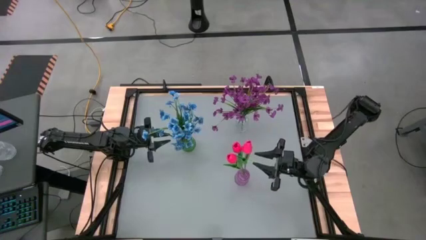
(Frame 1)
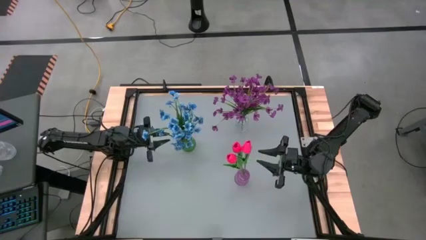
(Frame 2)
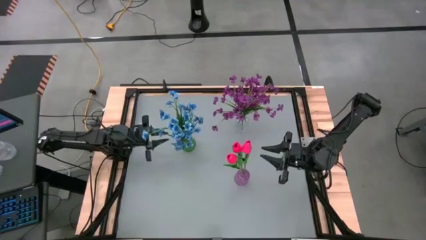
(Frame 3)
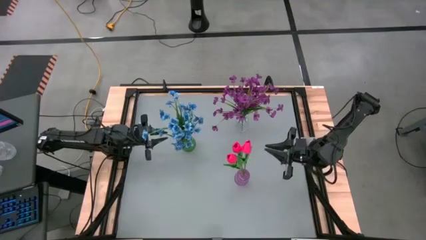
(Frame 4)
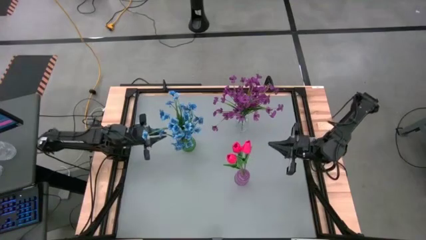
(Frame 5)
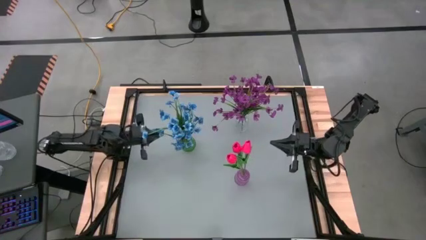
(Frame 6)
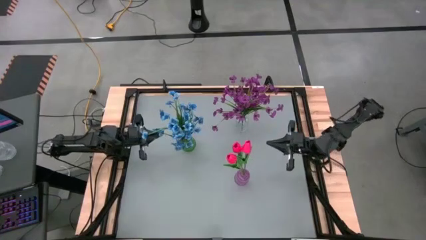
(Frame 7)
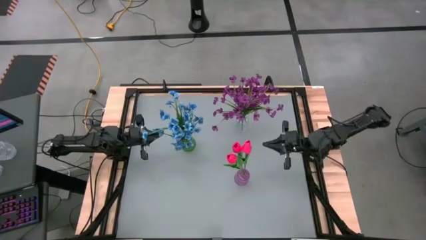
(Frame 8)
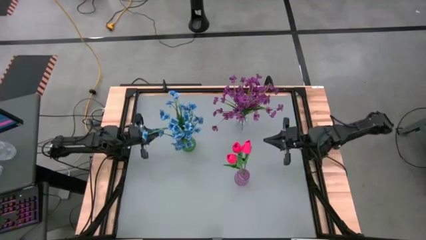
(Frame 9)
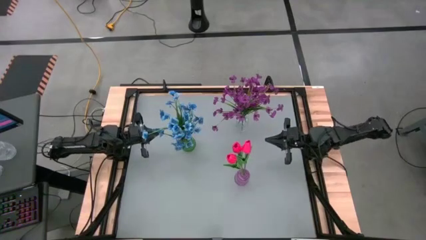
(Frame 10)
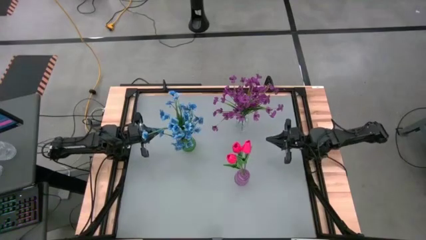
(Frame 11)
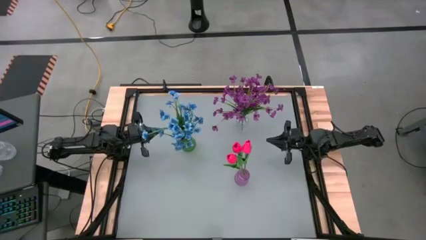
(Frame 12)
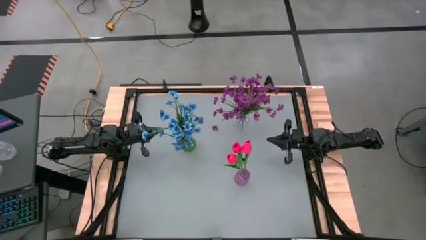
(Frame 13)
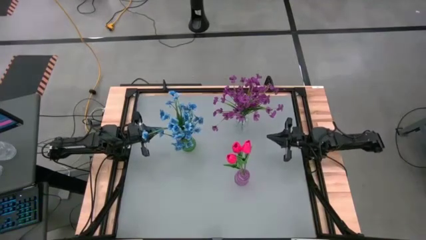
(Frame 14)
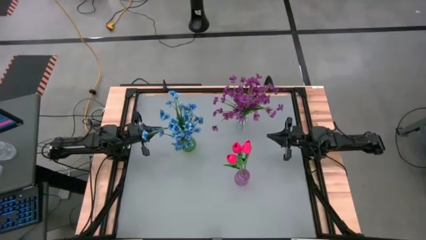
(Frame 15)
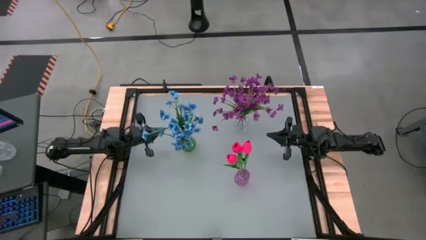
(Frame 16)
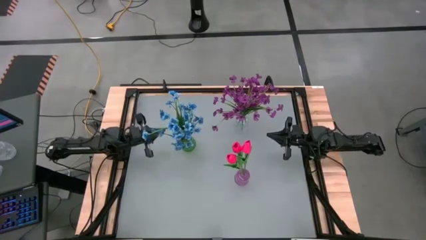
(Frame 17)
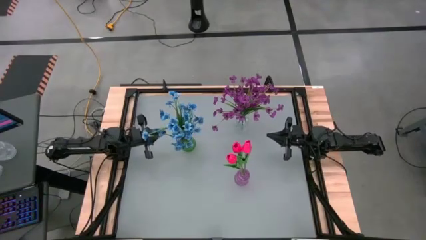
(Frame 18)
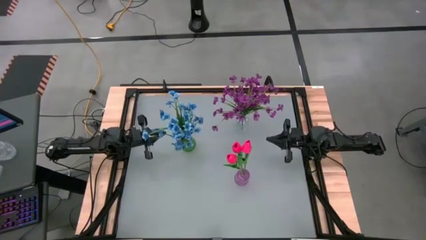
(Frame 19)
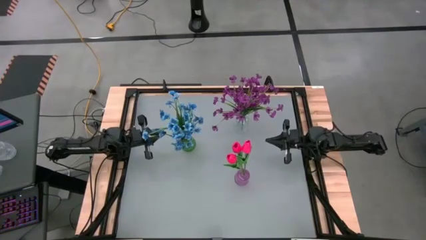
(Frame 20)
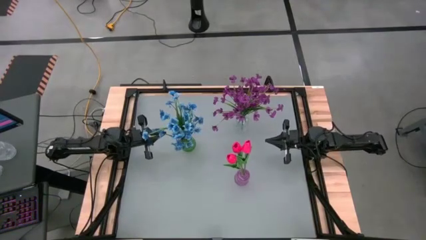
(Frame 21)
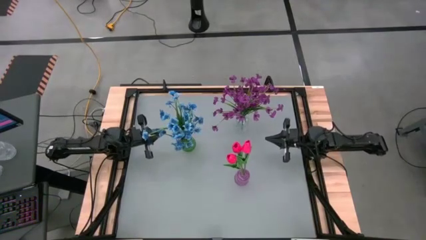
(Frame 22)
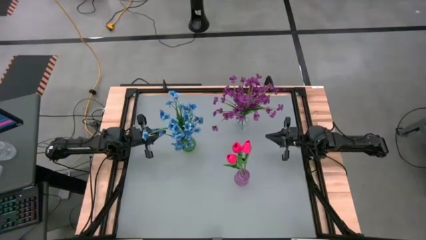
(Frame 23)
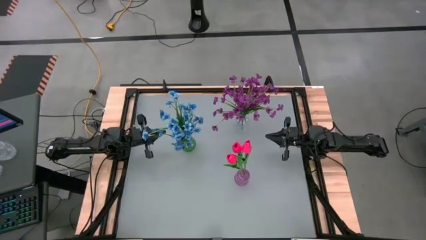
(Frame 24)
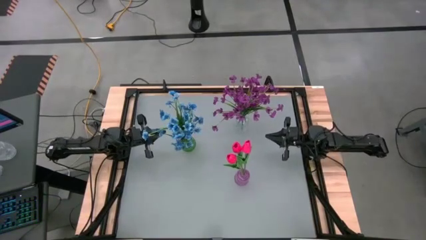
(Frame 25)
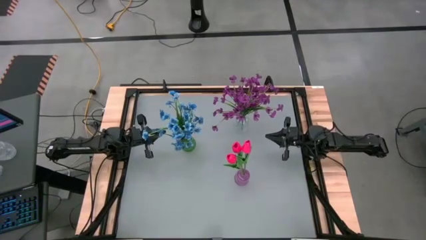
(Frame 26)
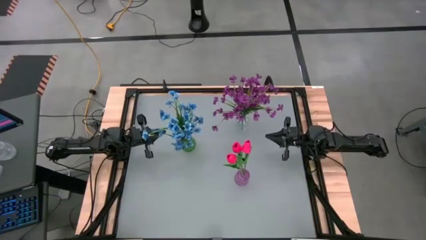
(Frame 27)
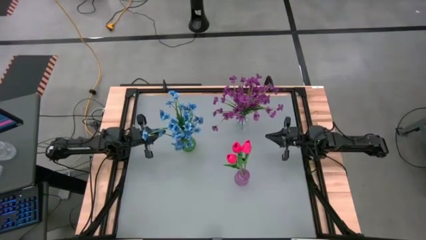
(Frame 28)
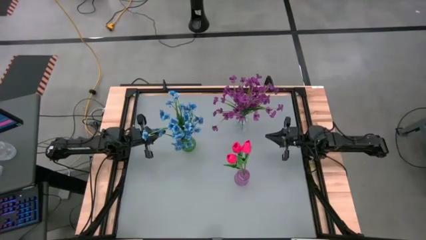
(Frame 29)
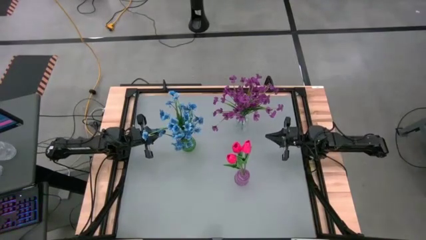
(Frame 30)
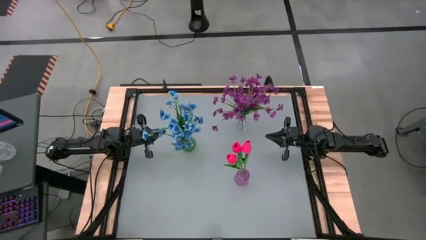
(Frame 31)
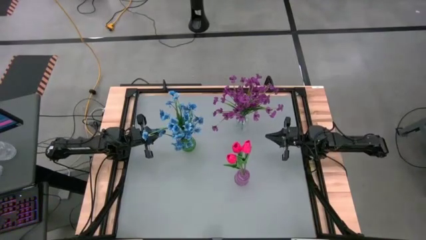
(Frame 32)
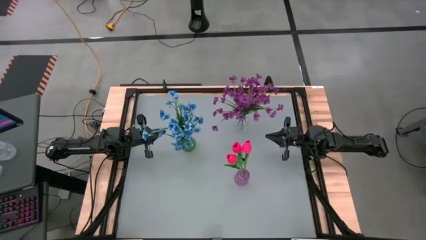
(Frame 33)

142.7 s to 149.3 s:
Task: Sort flowers into vase by color
Return to Home Position

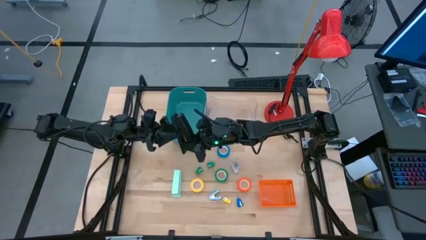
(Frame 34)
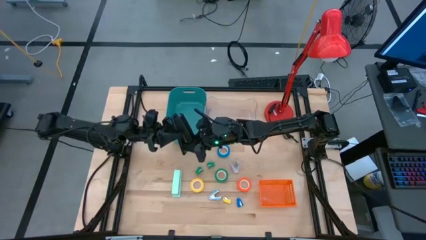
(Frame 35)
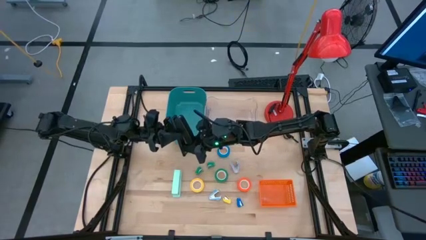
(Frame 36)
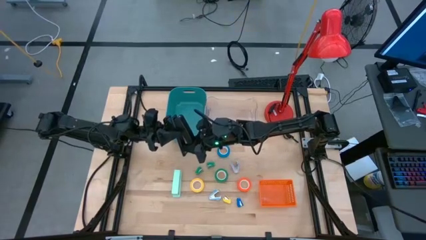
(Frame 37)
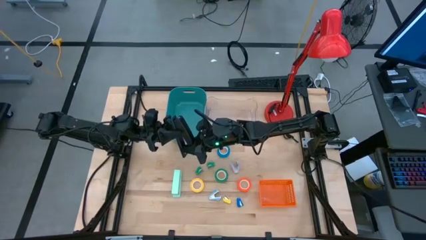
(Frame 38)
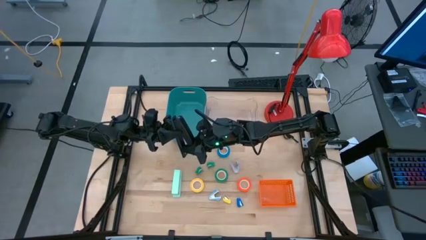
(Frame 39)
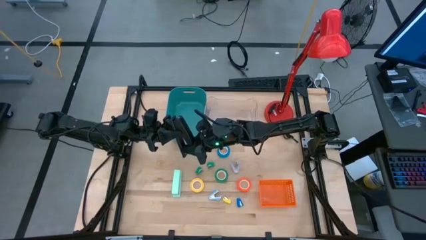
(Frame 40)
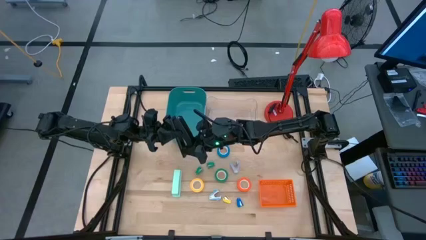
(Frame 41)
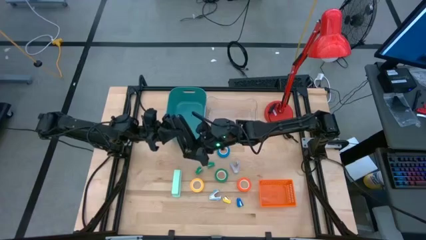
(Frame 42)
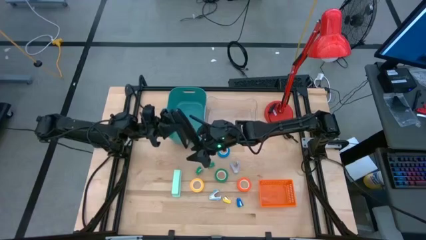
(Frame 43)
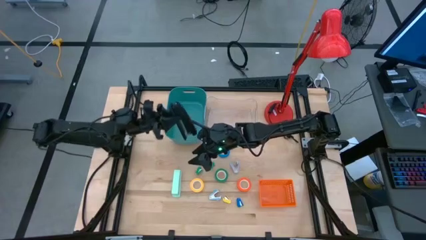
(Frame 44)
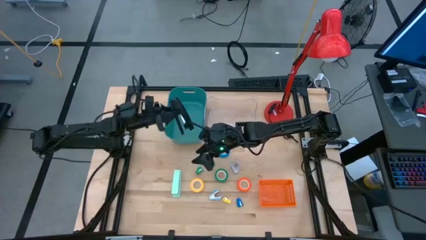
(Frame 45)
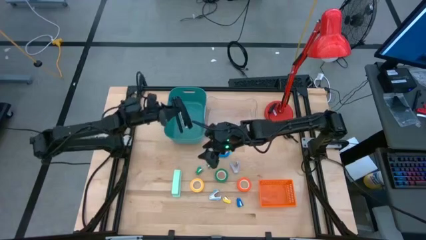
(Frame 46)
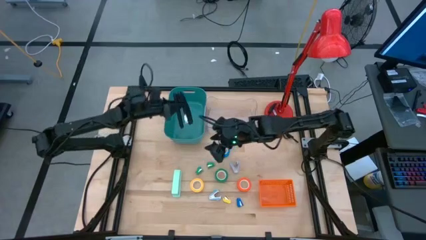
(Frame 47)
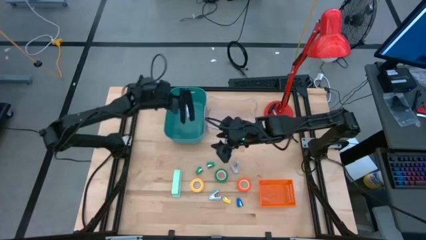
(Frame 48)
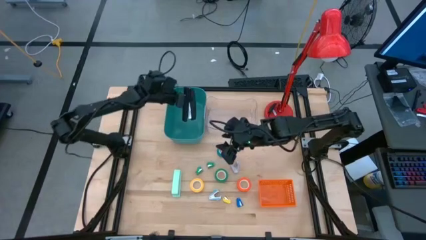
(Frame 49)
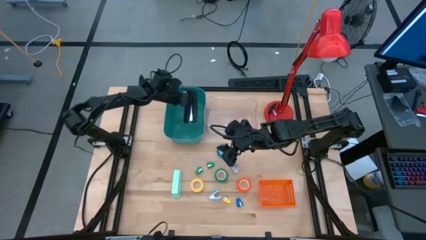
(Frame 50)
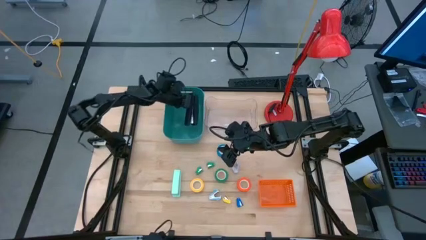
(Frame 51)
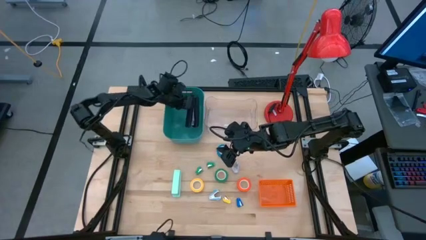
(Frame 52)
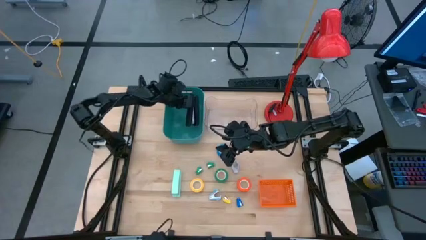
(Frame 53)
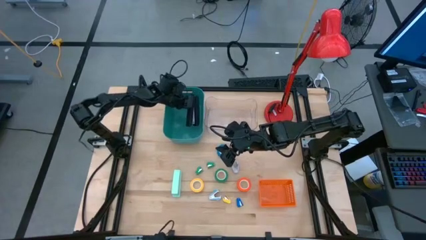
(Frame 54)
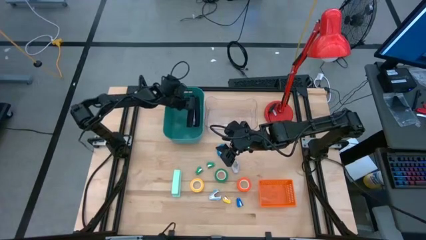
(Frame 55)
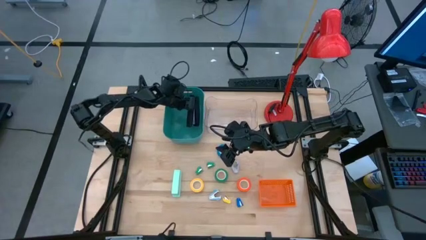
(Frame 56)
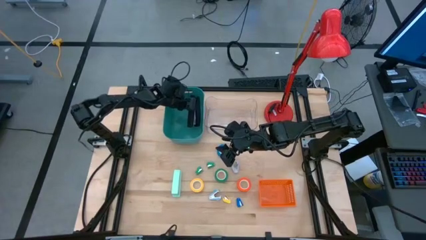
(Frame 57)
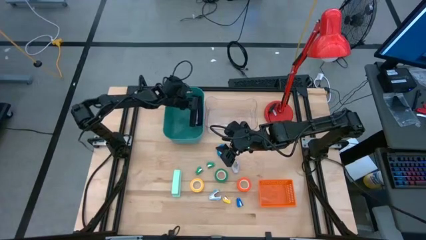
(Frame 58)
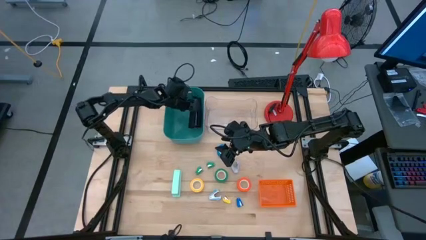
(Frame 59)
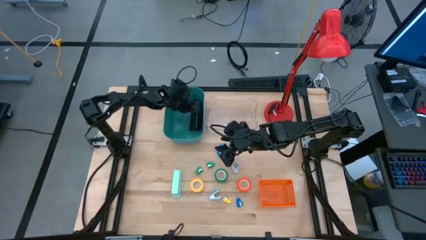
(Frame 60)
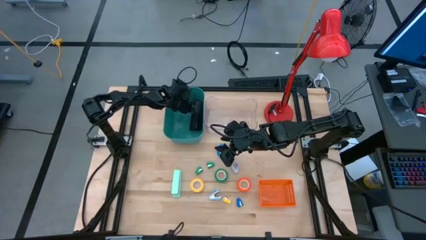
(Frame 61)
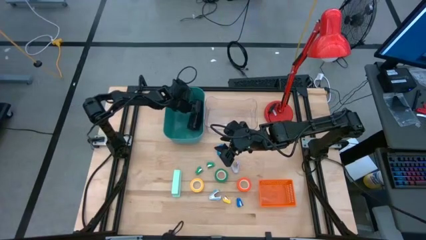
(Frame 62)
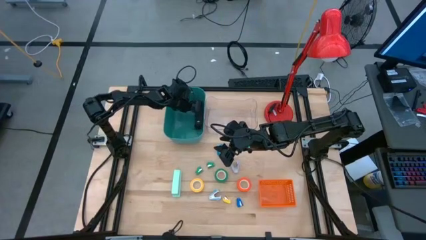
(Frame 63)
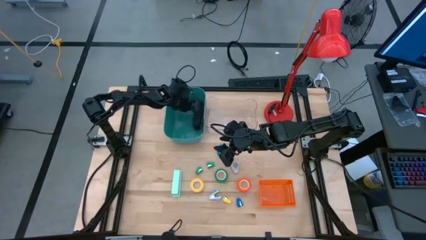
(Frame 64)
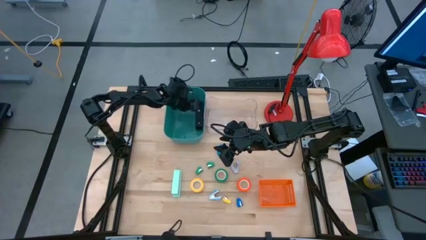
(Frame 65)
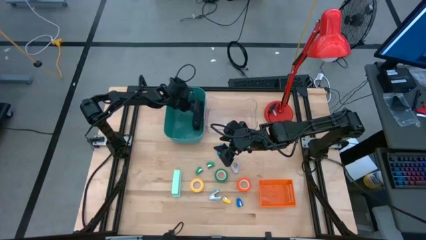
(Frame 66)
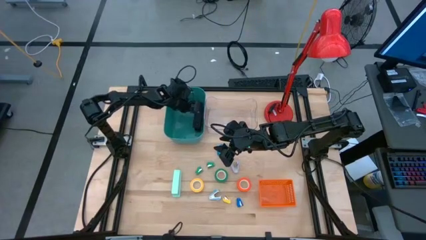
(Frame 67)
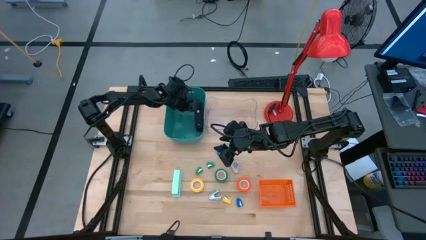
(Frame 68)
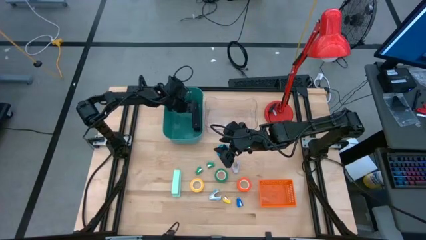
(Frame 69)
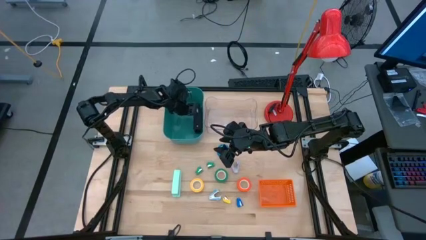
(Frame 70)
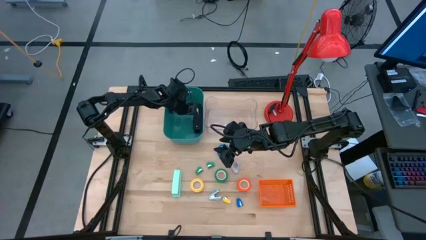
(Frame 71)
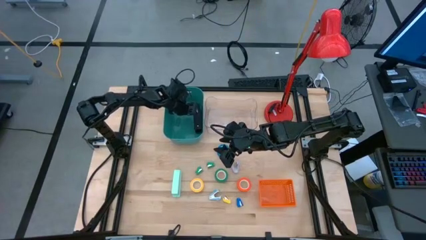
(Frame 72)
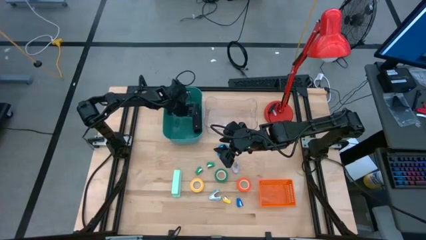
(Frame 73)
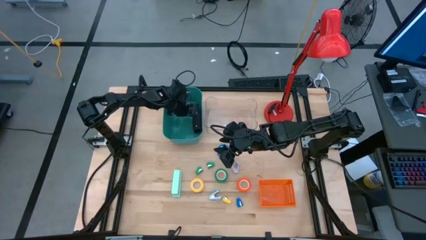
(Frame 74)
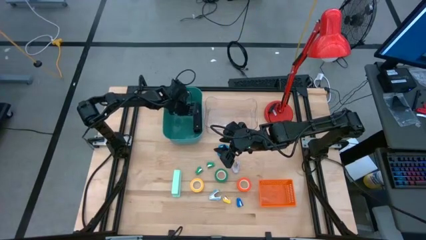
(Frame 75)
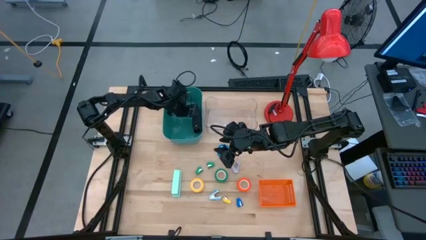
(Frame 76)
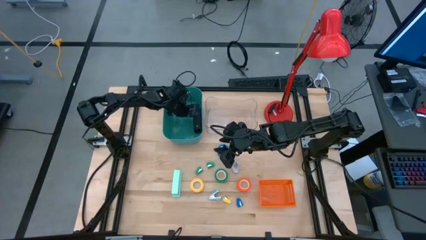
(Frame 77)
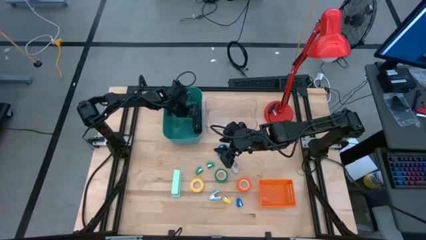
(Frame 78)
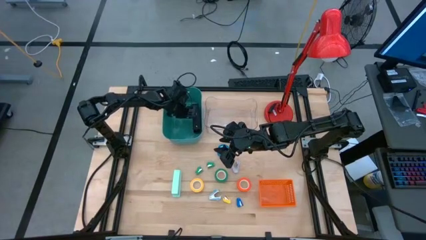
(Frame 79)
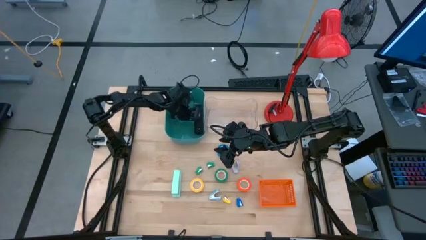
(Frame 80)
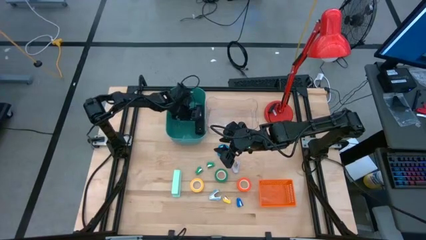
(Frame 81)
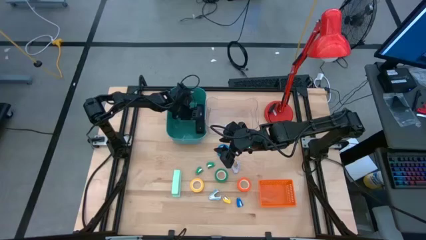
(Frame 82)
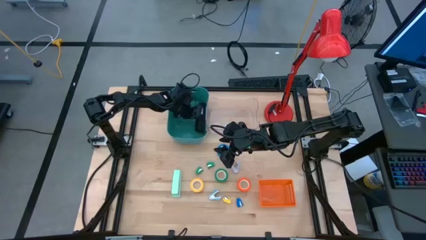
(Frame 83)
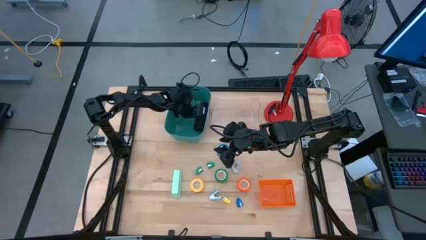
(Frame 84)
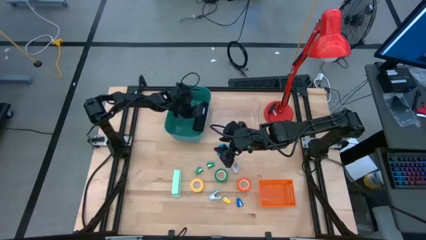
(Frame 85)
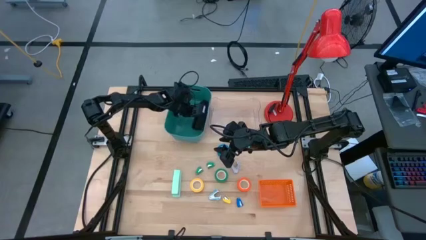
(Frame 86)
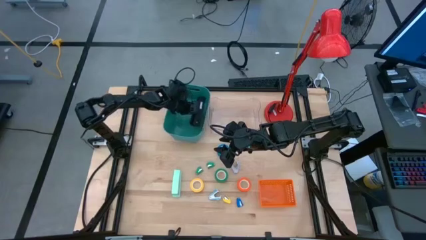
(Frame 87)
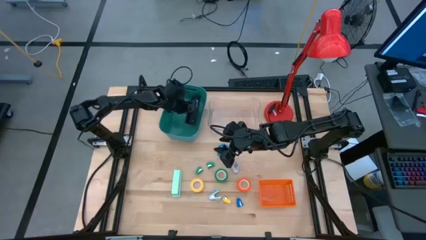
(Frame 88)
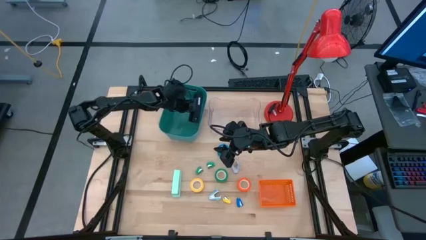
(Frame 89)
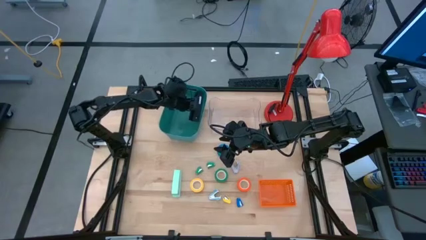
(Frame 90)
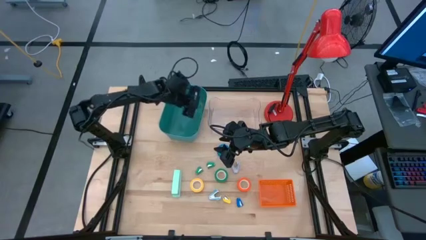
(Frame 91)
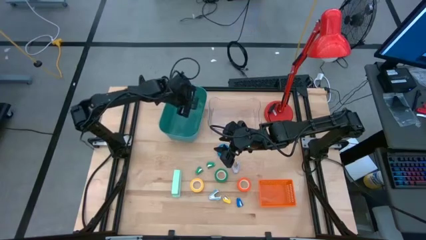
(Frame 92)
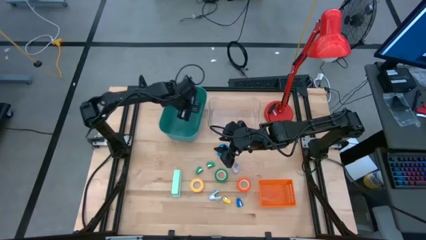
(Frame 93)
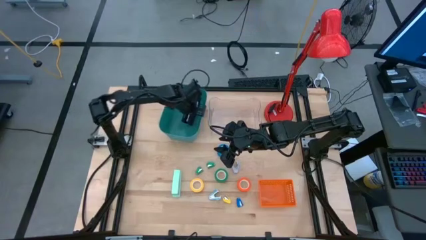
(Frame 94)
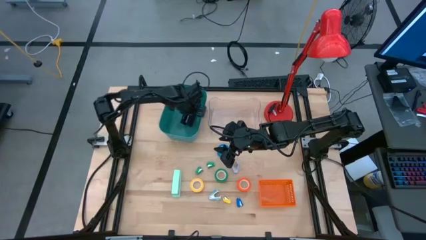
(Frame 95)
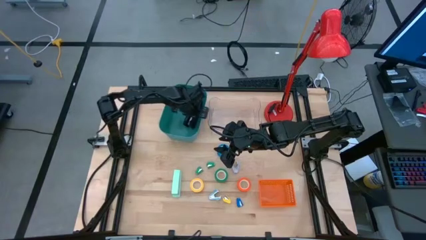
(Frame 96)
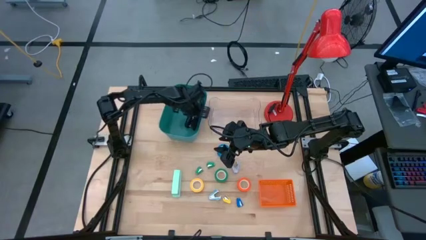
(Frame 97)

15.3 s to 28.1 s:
Task: Pick and place Stapler, Stapler remover, tape
Put the large black stapler into the blue bin
